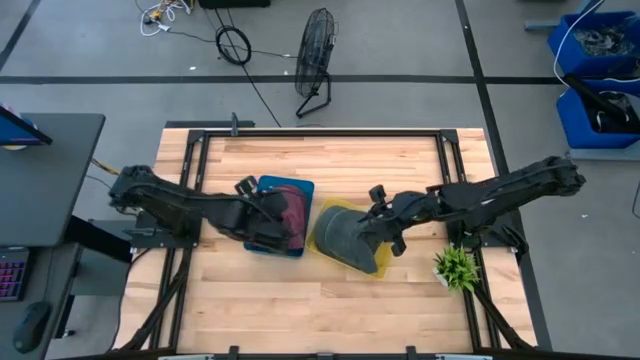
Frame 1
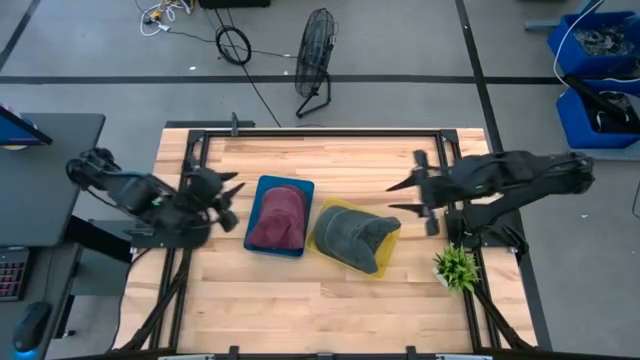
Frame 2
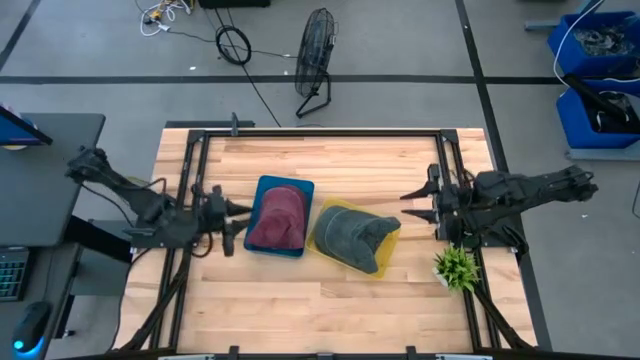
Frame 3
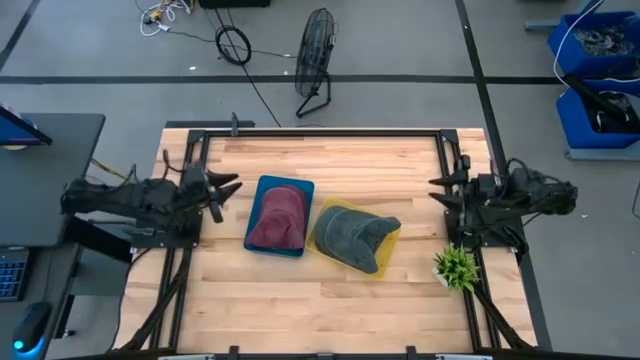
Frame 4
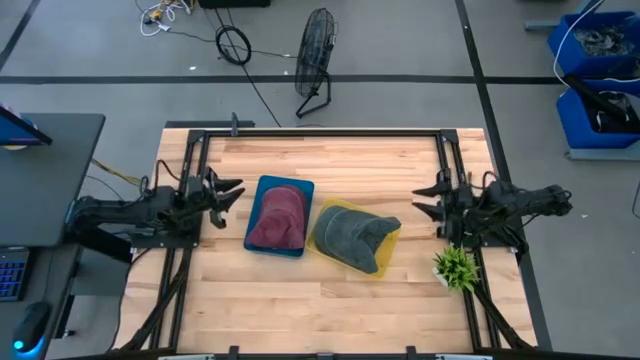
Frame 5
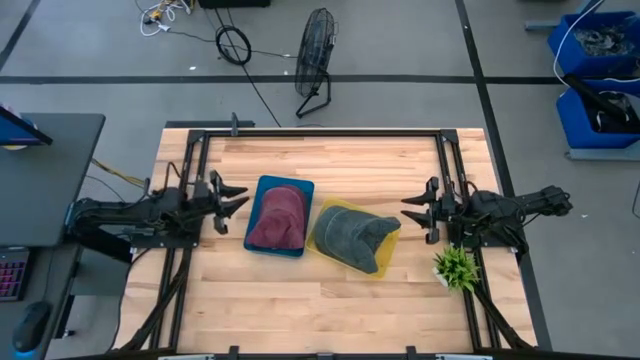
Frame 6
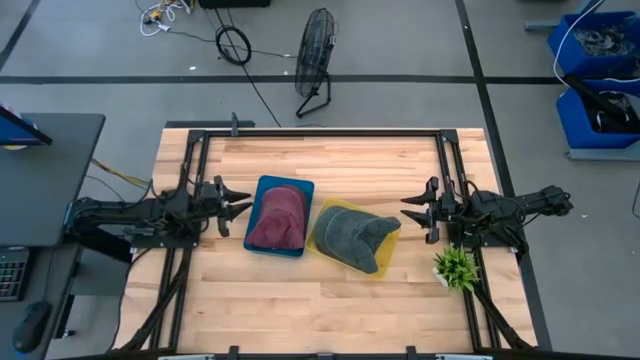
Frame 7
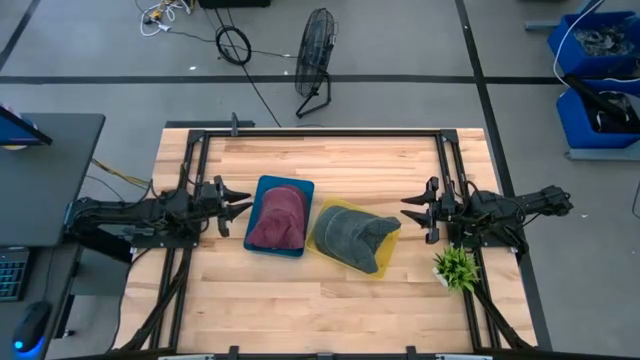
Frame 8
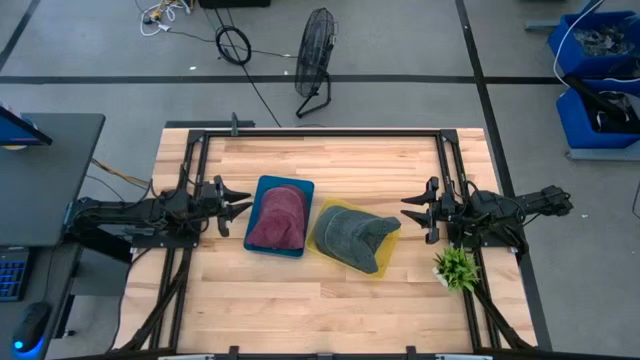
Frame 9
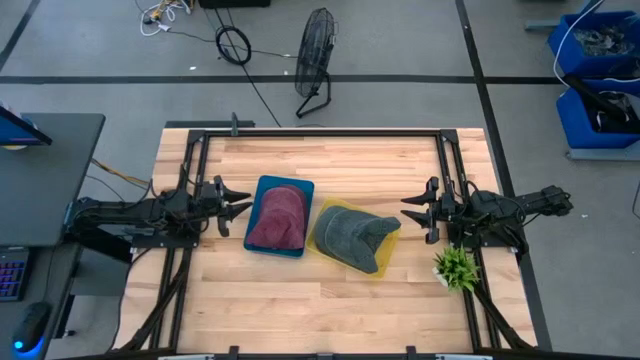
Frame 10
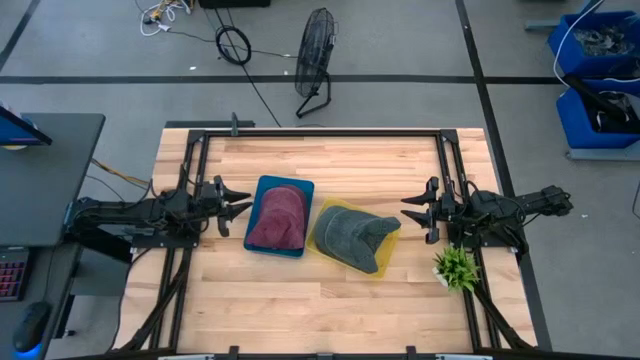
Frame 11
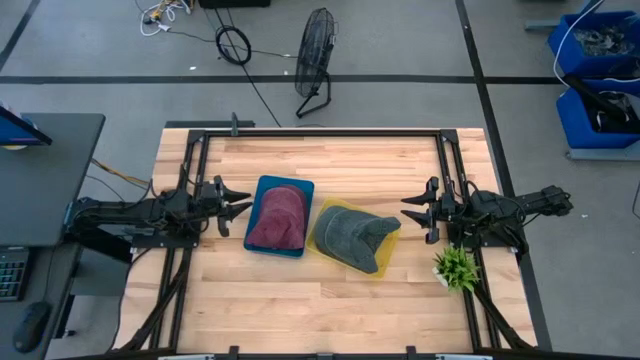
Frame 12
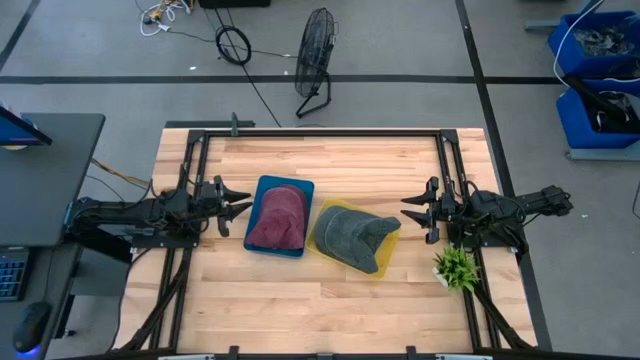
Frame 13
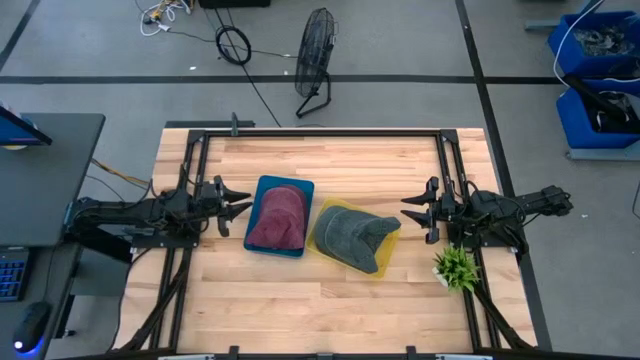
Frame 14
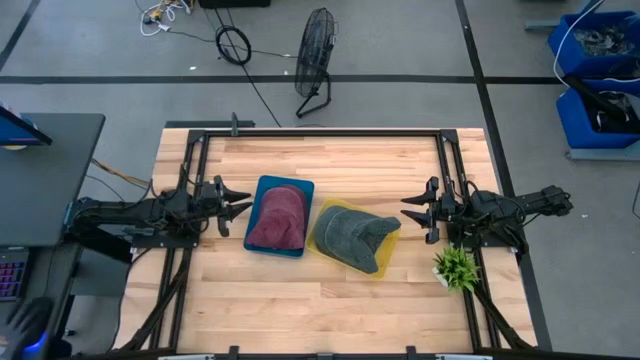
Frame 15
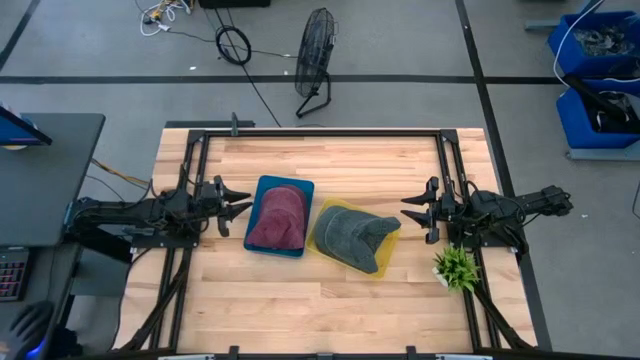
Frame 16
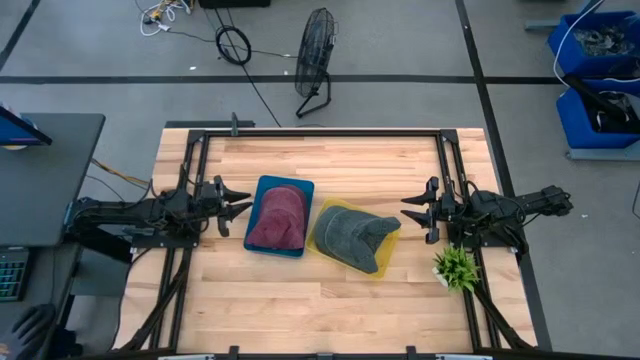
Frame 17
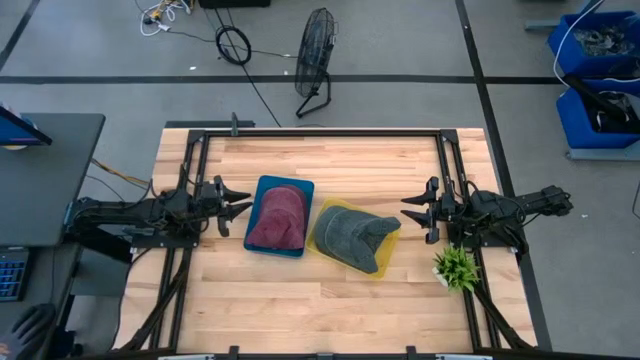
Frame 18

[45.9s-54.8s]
Task: Pick & Place hat
Return to Home Position

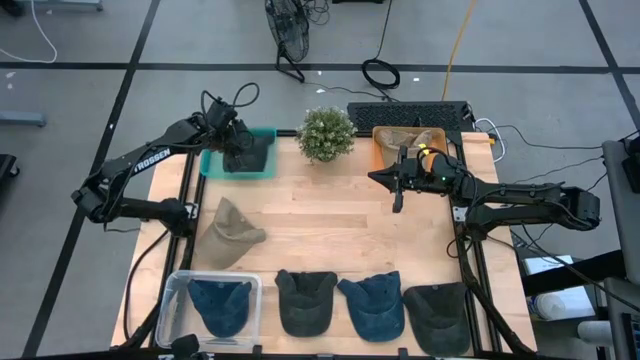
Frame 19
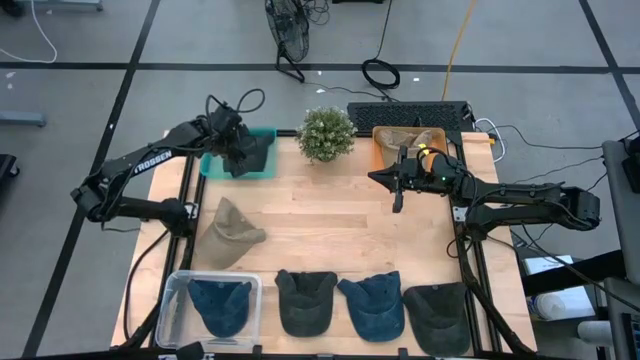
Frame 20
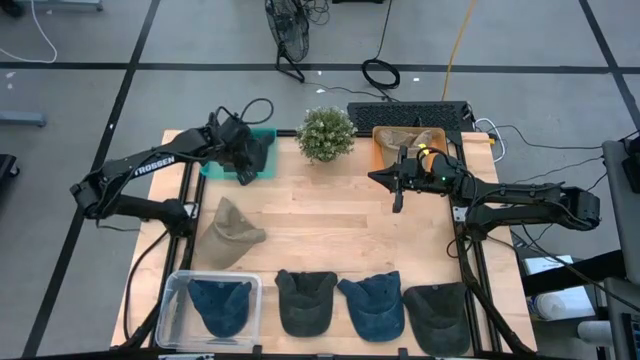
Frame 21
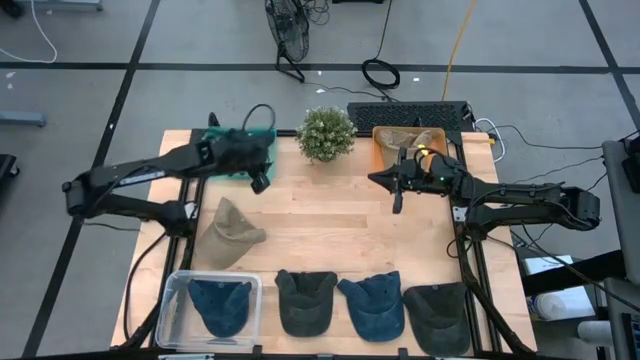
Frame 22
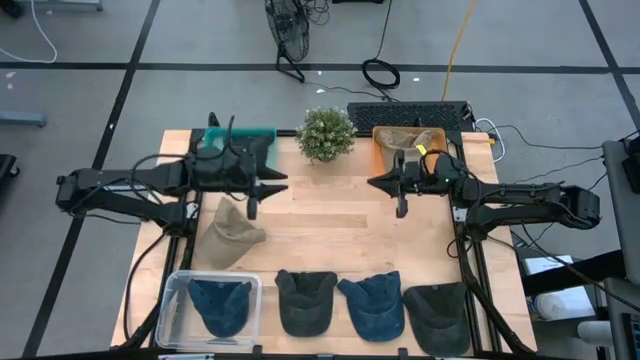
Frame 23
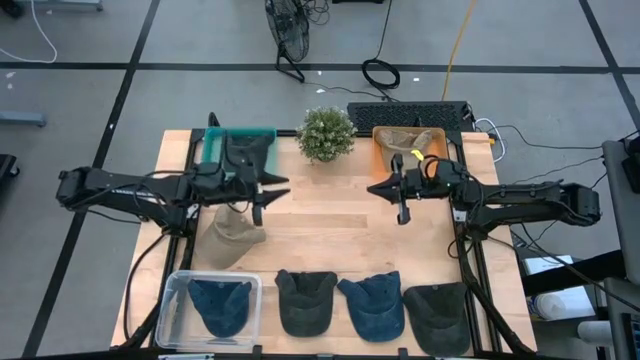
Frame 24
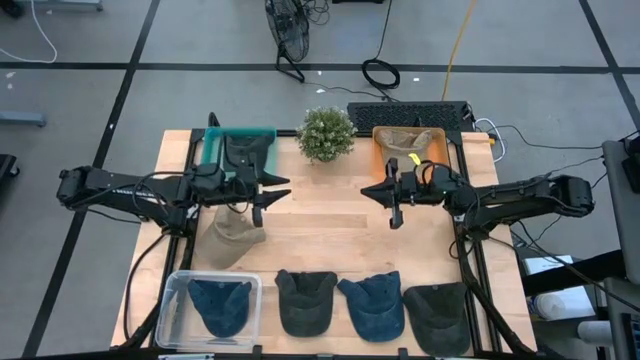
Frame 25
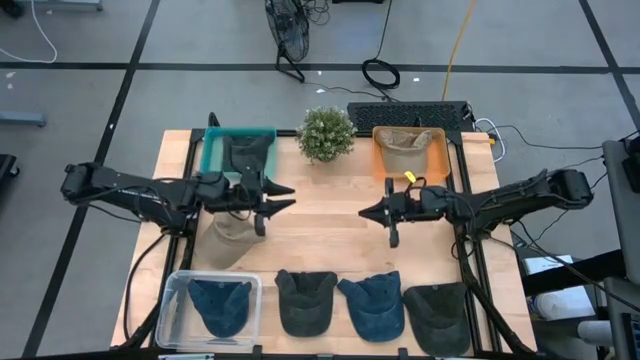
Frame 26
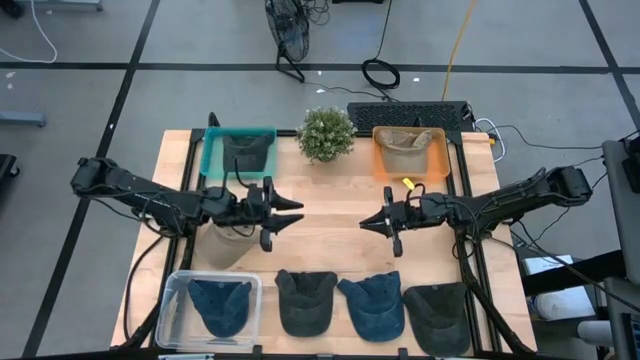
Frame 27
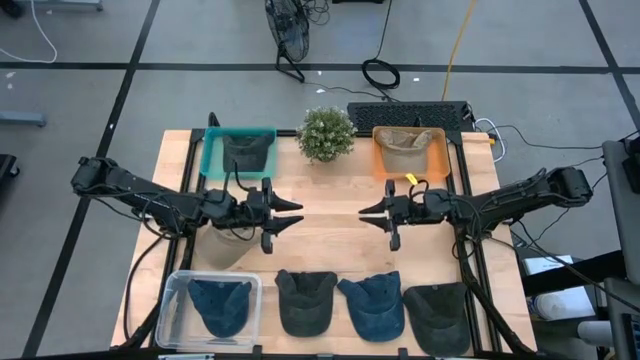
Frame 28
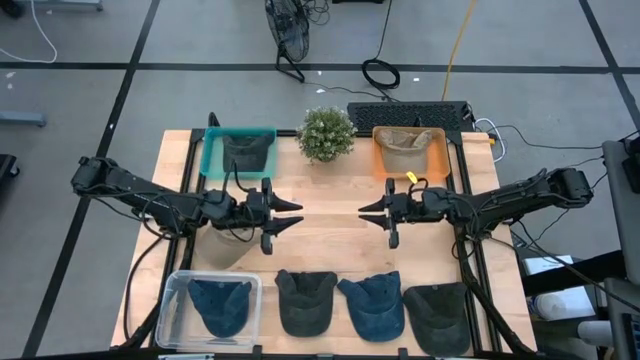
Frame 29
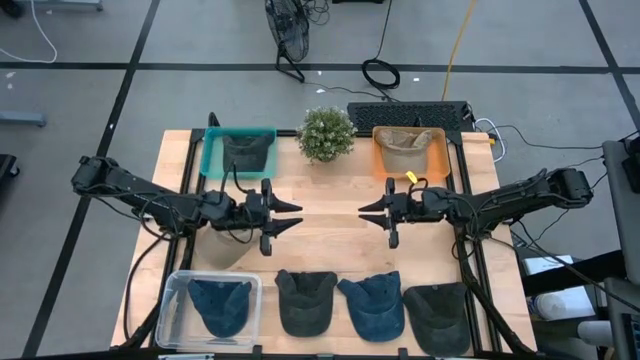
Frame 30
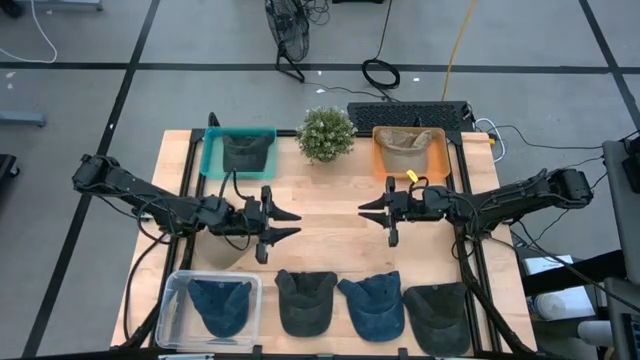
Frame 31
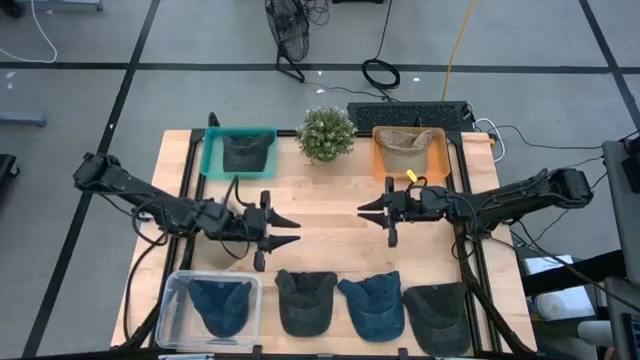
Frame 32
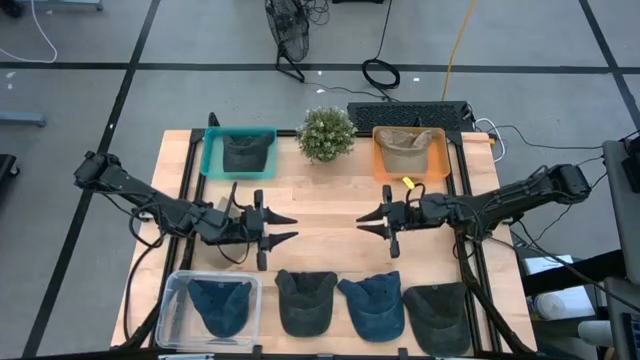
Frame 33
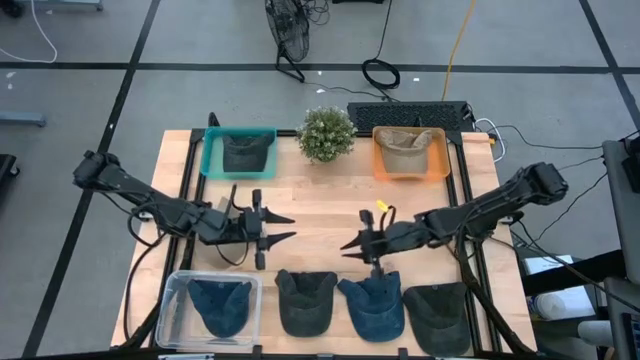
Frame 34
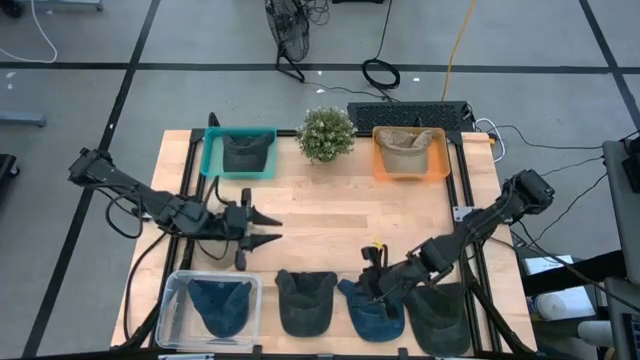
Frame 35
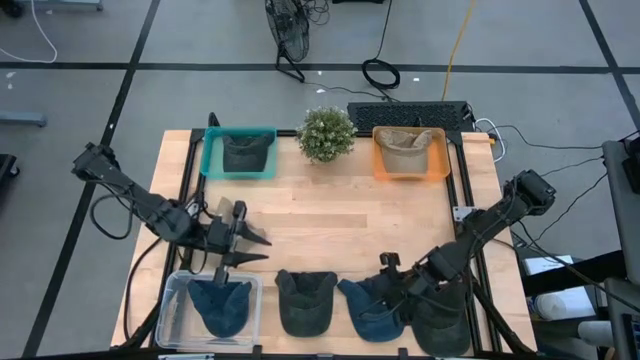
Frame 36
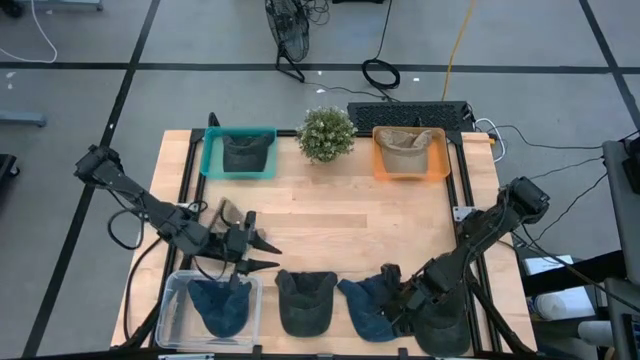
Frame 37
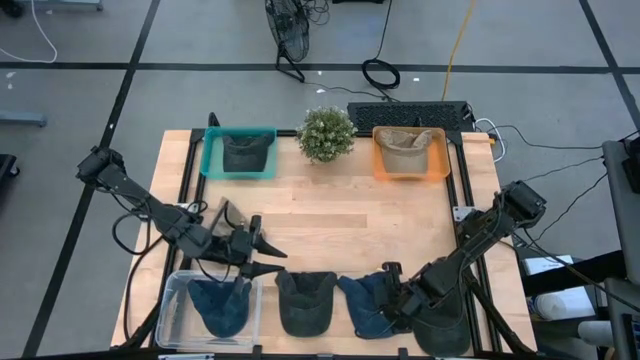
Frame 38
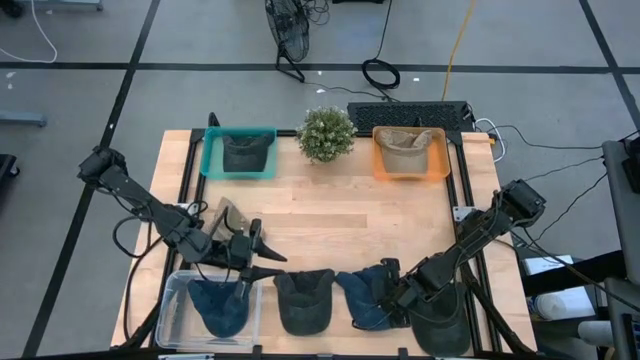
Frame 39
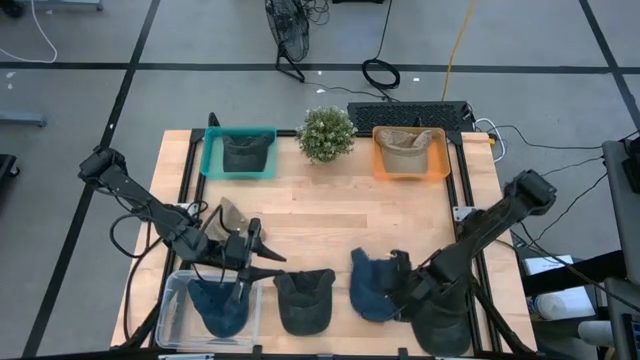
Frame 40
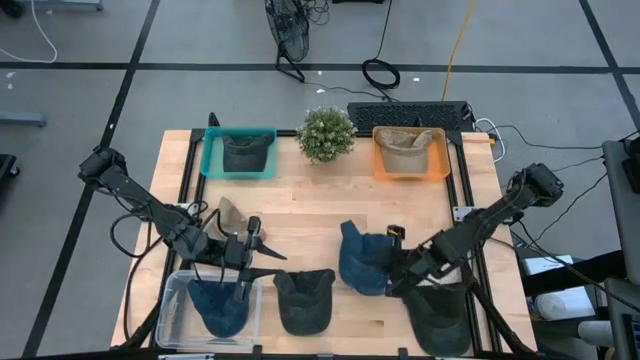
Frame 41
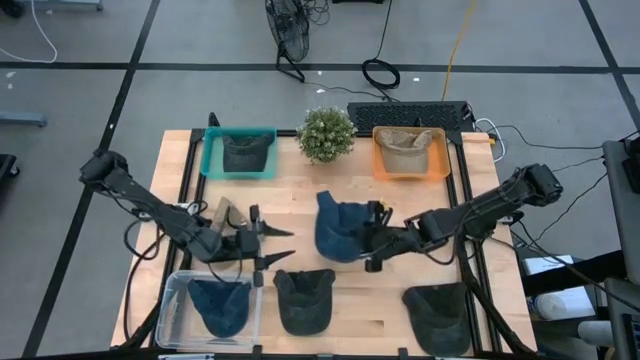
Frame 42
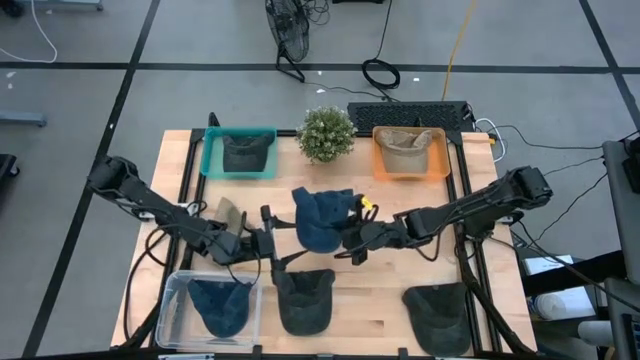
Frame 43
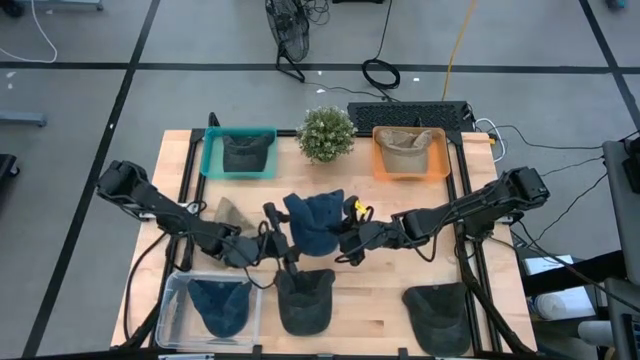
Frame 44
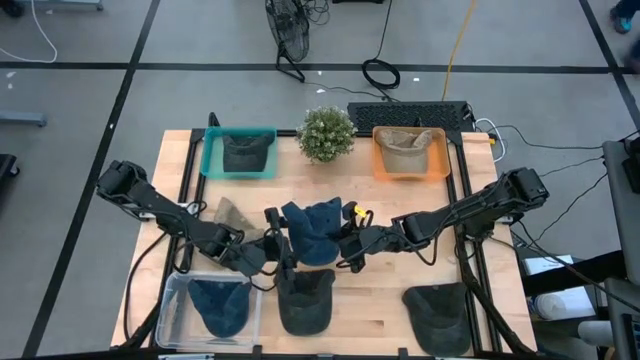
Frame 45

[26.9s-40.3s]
Task: Pick & Place hat
Put the blue cap into the transparent bin
